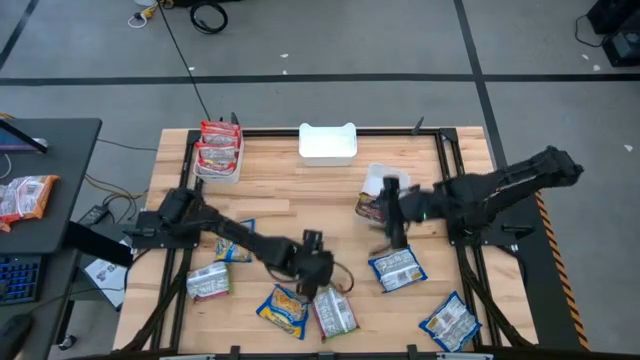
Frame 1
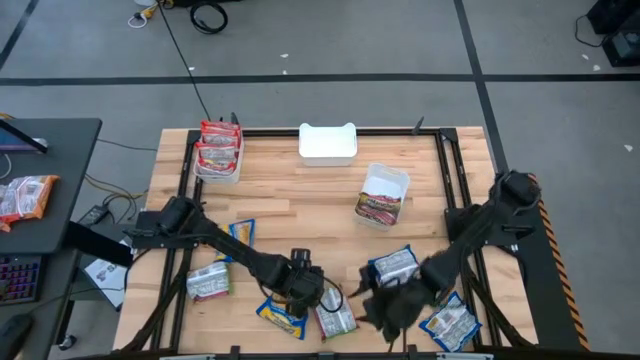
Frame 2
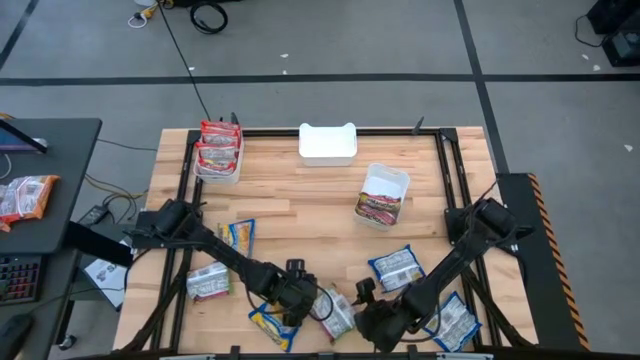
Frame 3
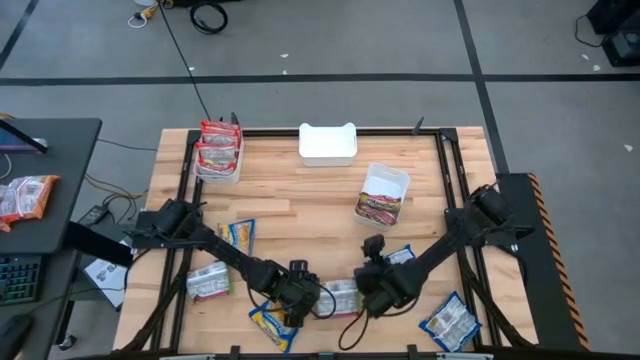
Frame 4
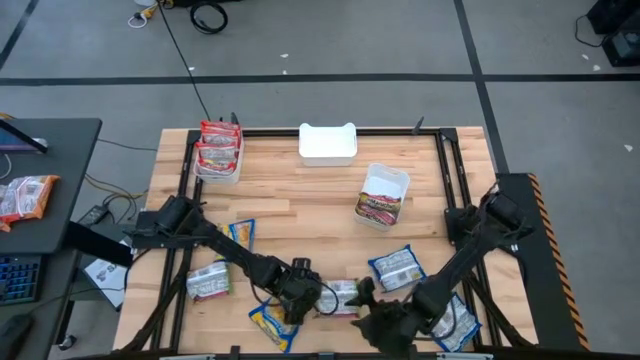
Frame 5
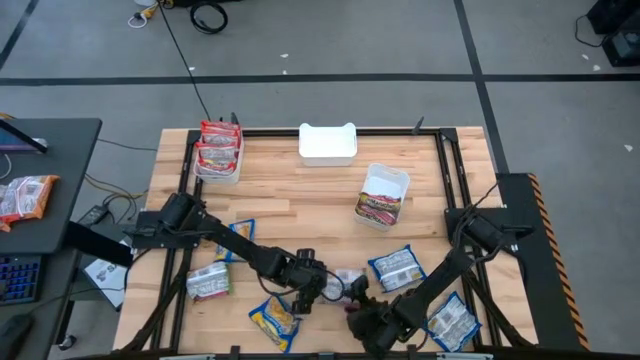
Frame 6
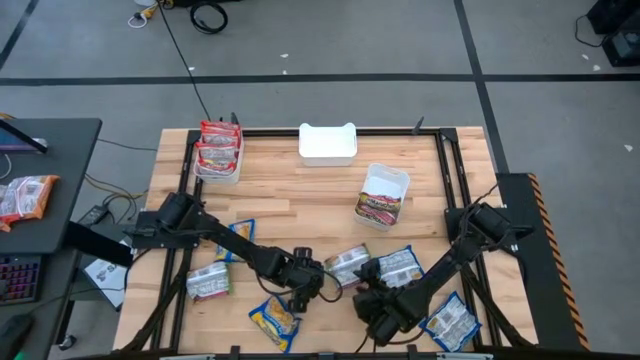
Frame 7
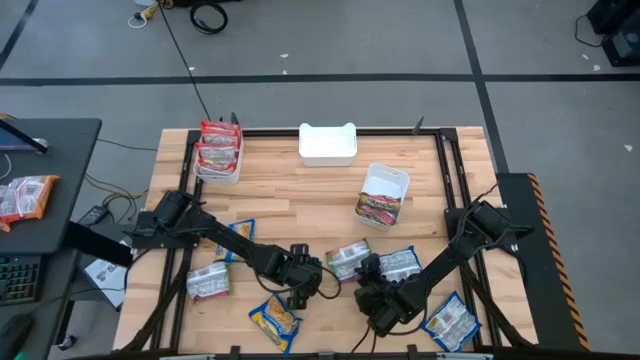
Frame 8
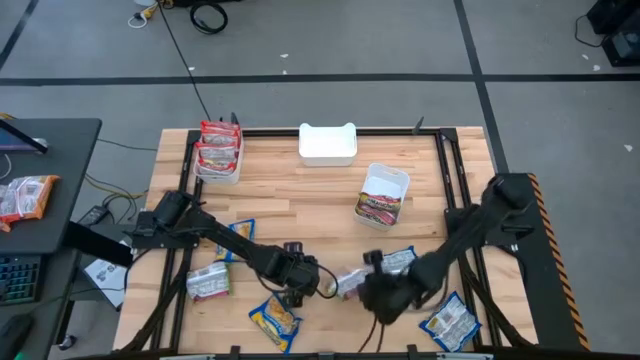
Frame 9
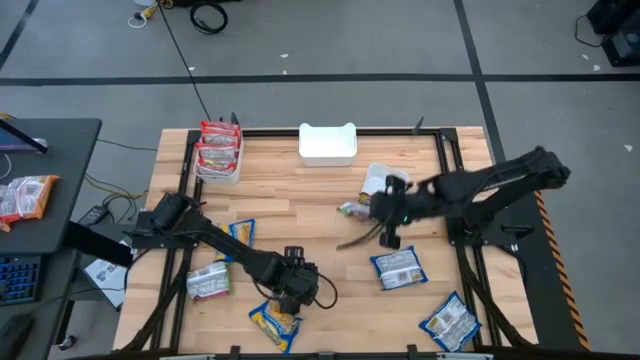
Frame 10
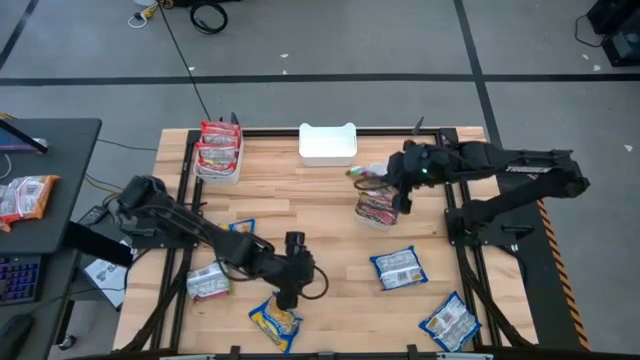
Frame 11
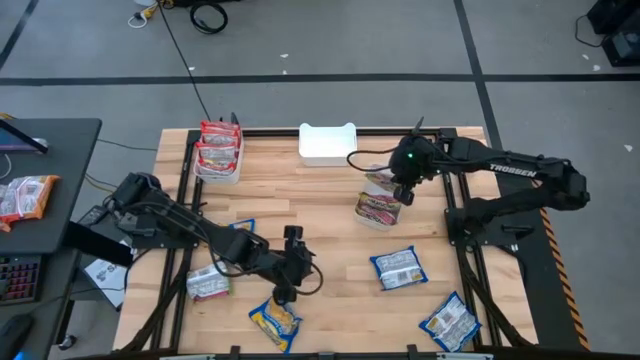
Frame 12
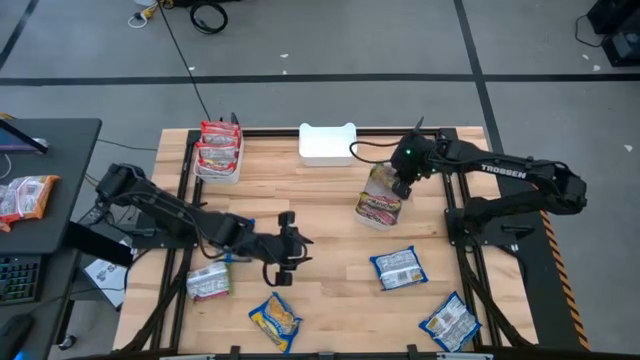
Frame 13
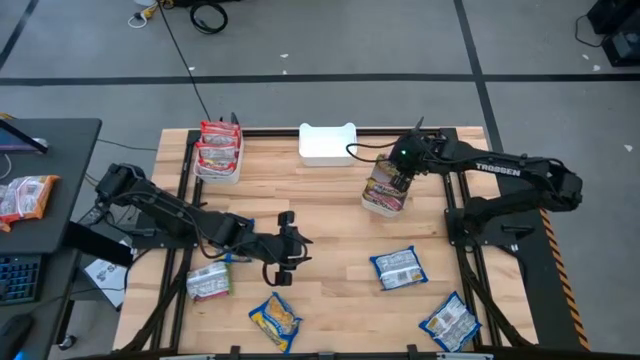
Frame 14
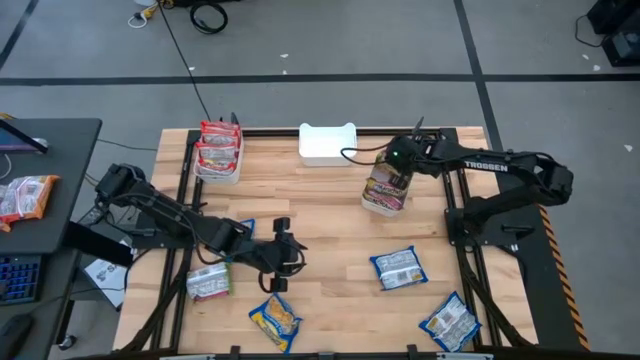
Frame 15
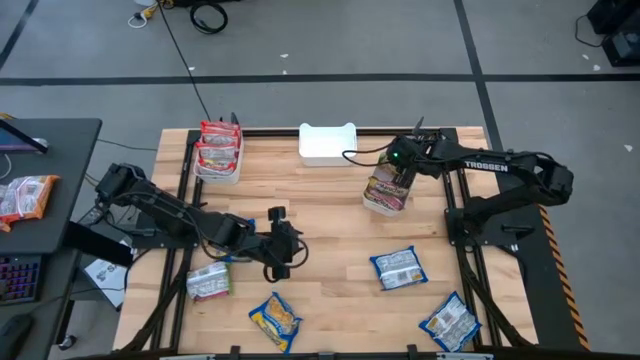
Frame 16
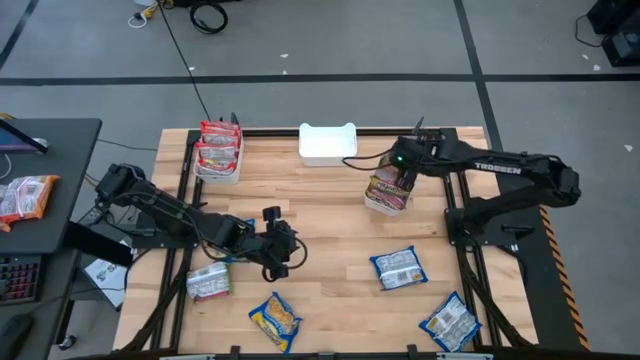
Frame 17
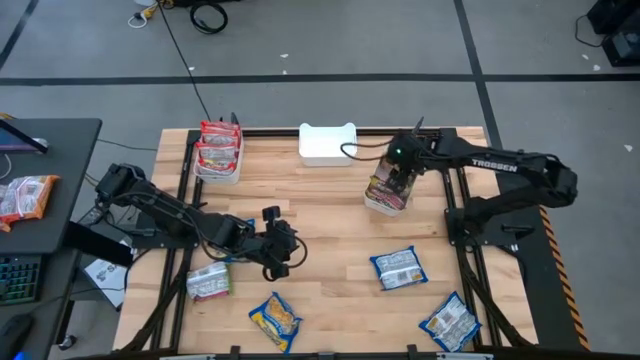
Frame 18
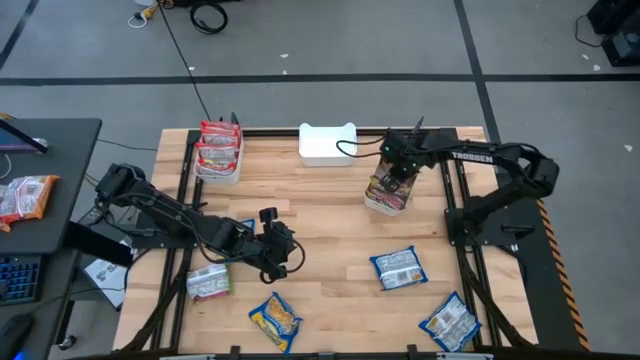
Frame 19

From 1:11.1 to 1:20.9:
Task: Sort Maruchan noodles
Put the green noodle pack into the right white bin

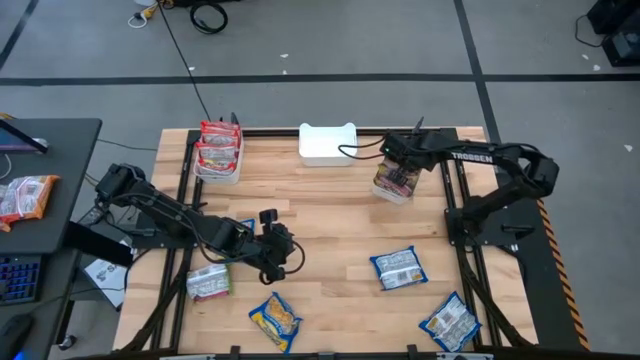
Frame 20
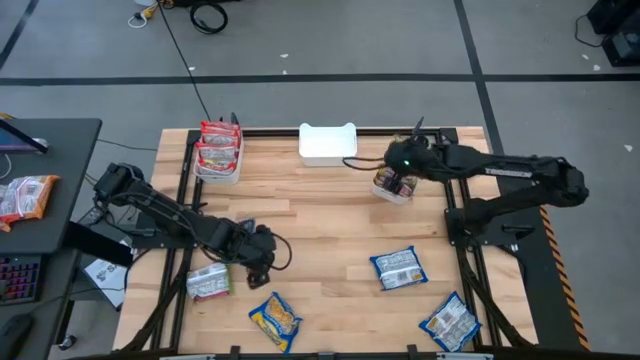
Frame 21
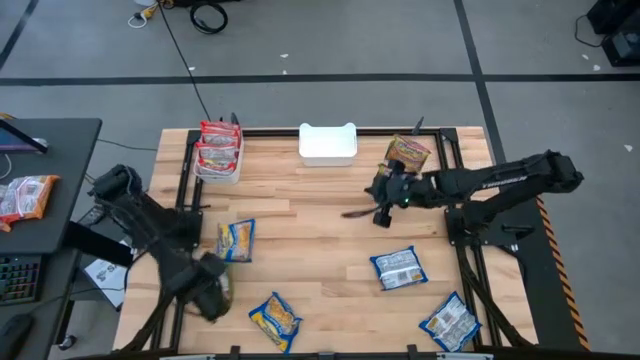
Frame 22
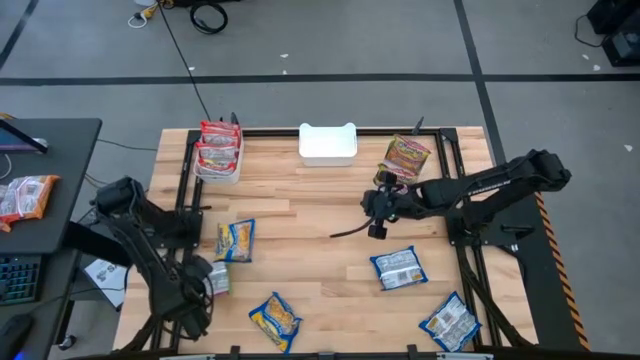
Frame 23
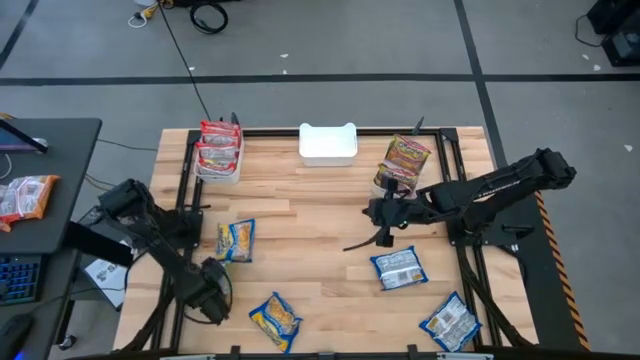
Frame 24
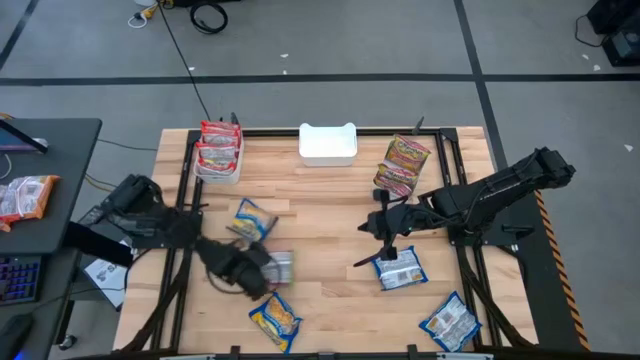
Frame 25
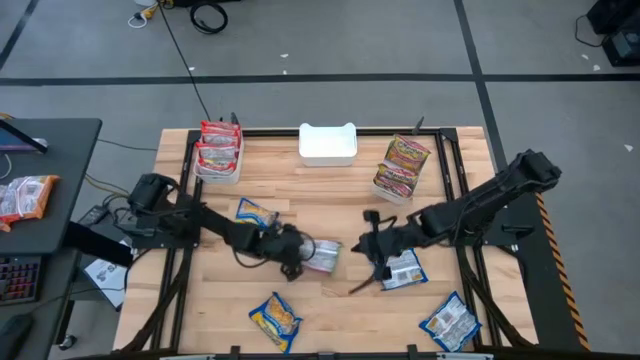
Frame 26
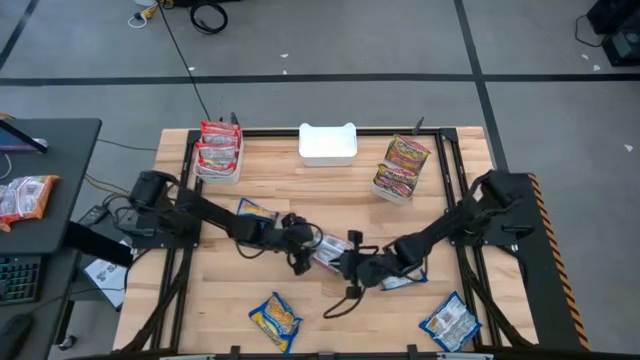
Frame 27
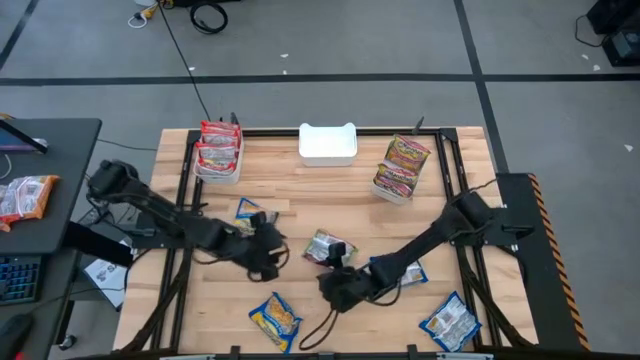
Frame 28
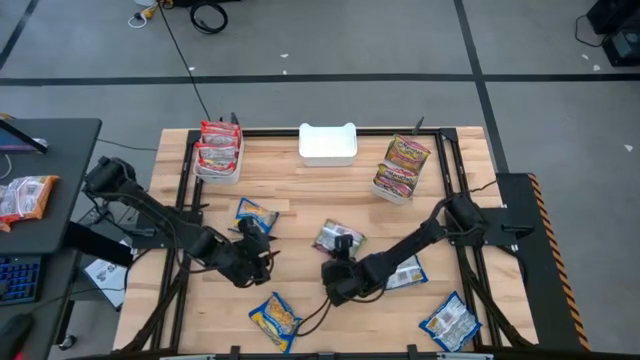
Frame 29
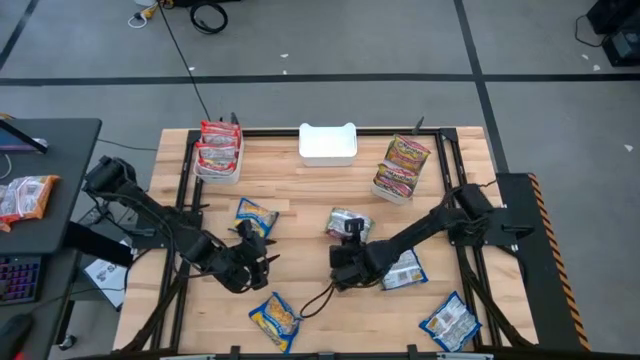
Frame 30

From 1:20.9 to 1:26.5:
Put the green noodle pack into the right white bin

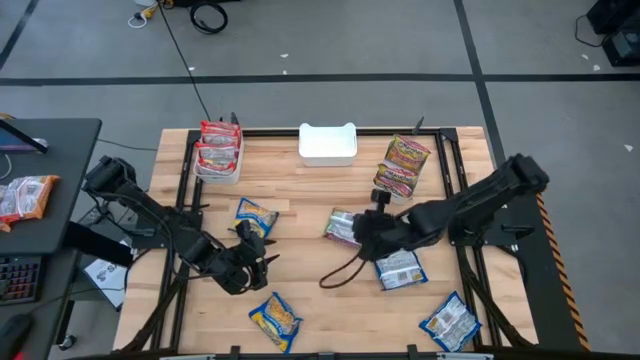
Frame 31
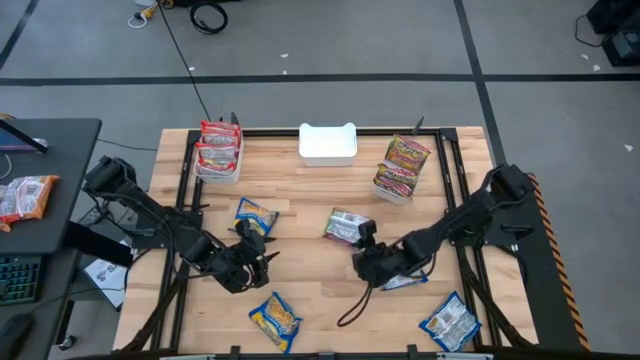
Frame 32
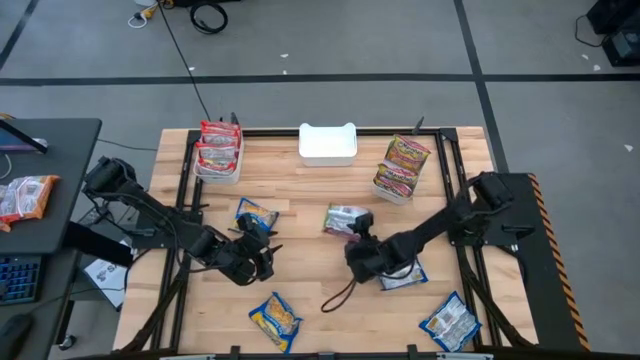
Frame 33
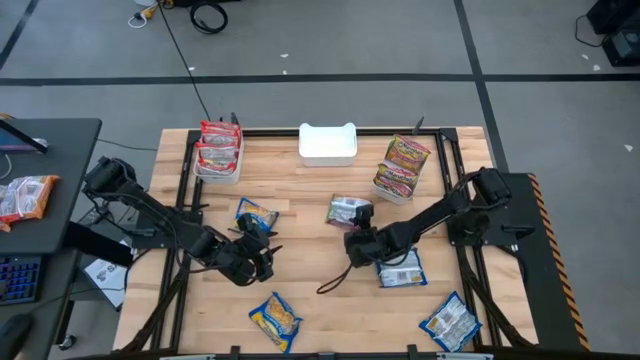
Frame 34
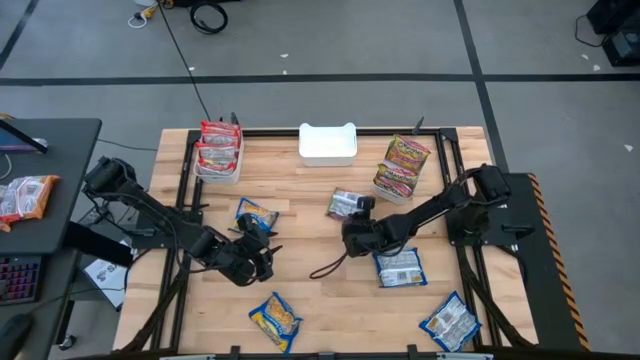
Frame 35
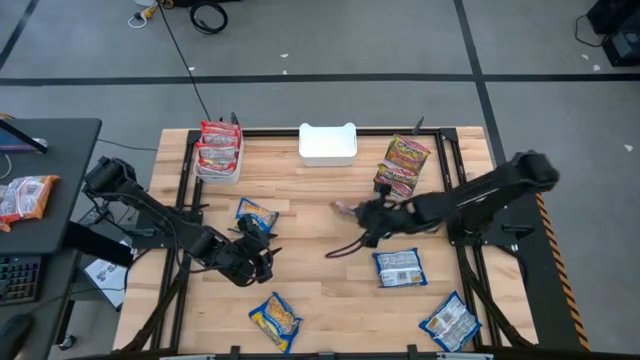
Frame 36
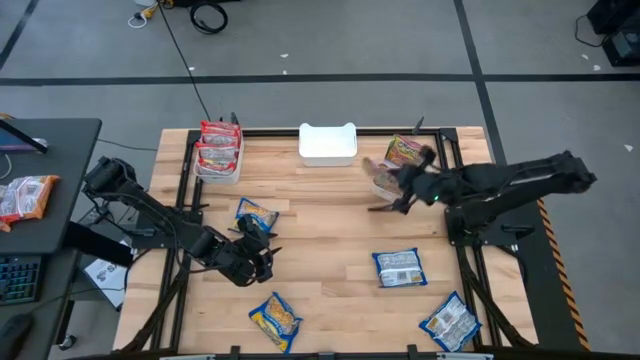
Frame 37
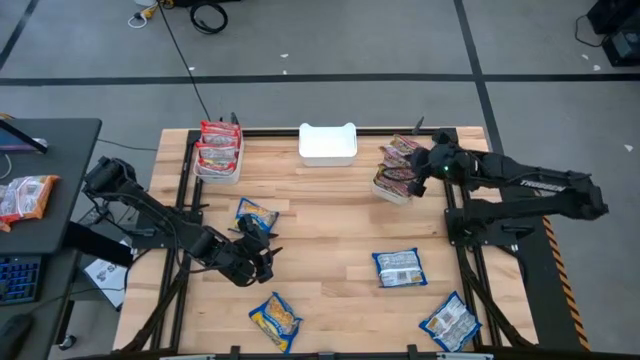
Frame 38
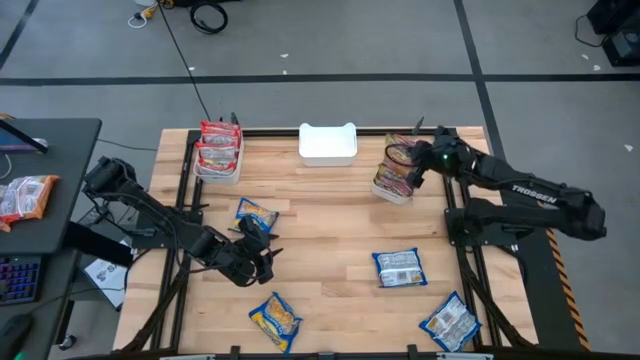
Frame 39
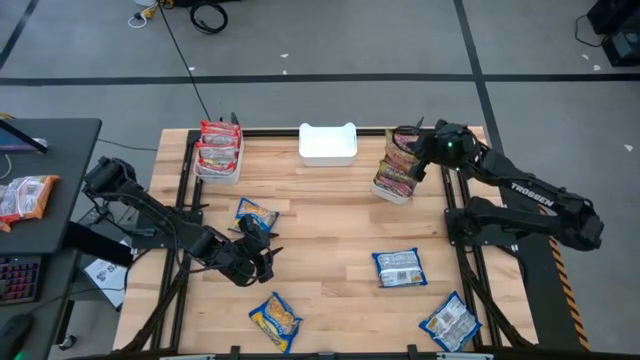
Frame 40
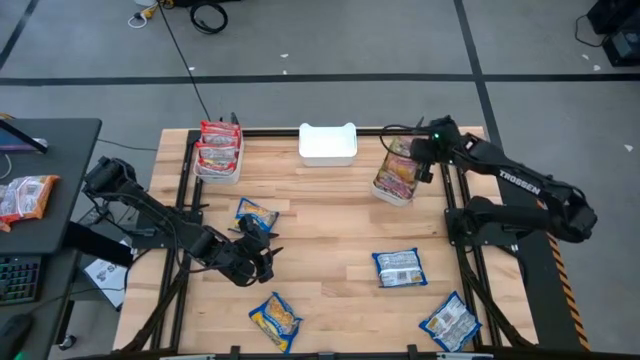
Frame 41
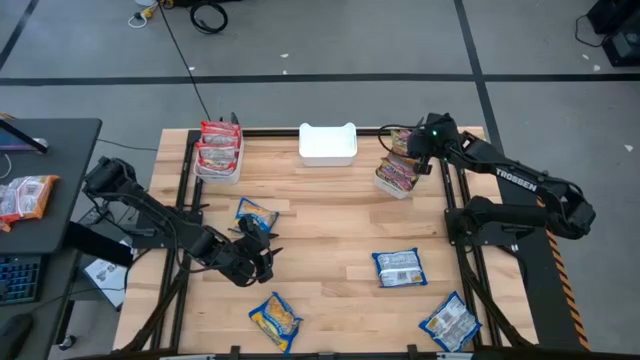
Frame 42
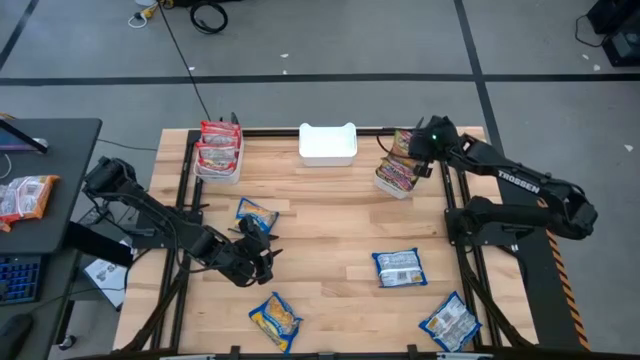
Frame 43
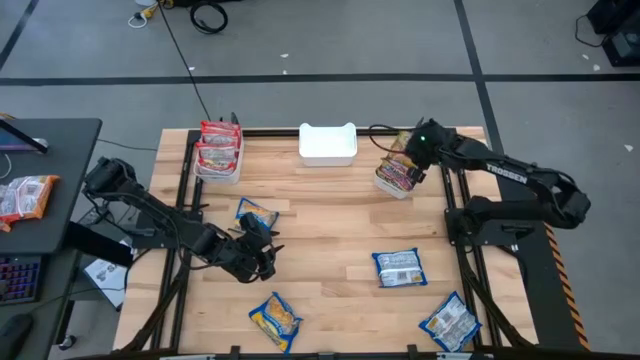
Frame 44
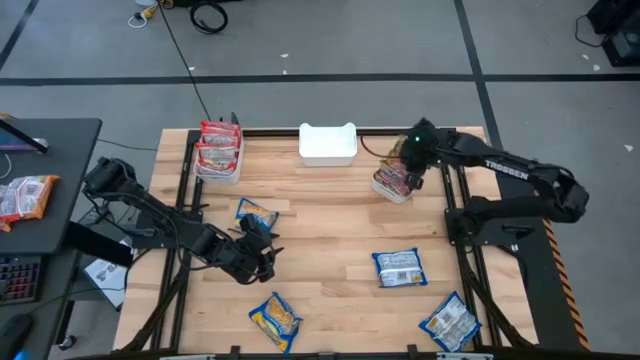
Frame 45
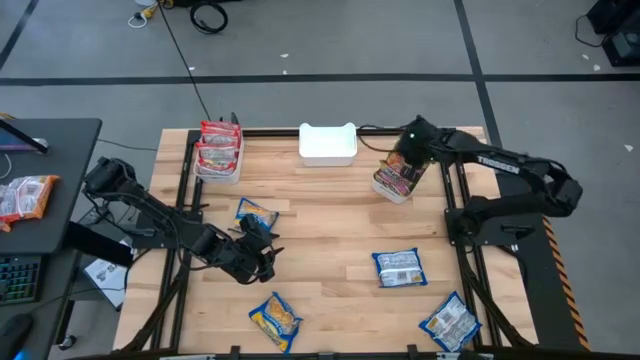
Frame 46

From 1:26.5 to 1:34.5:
Put the green noodle pack into the right white bin
